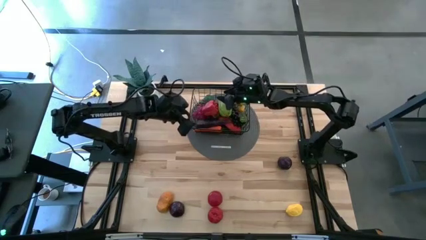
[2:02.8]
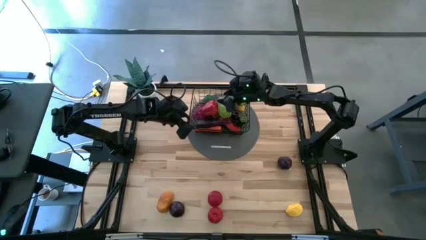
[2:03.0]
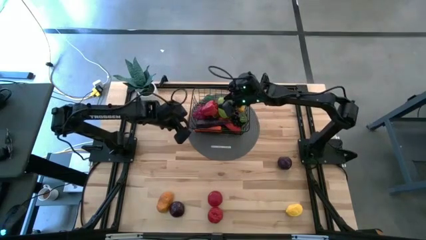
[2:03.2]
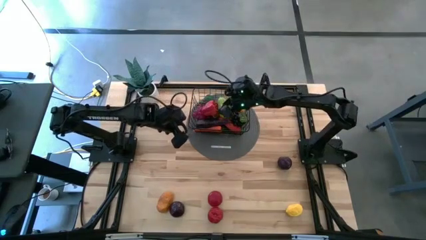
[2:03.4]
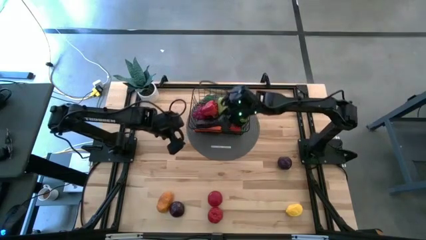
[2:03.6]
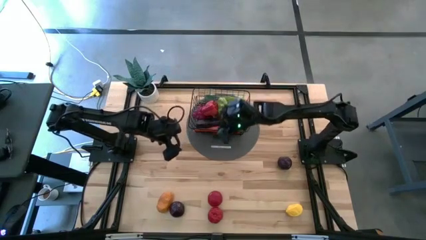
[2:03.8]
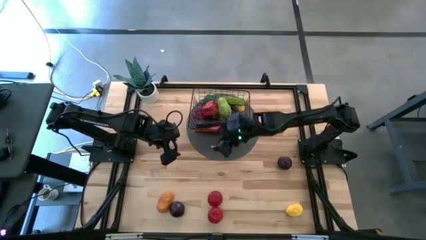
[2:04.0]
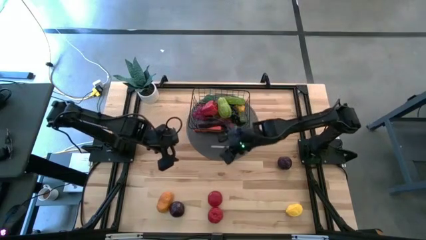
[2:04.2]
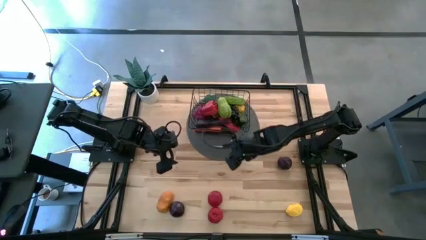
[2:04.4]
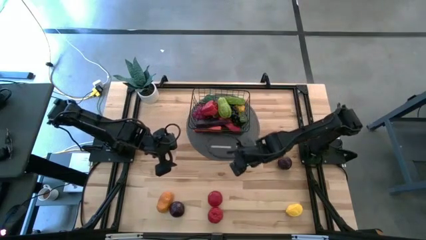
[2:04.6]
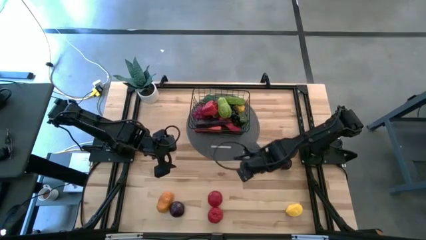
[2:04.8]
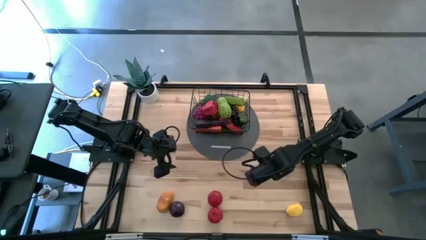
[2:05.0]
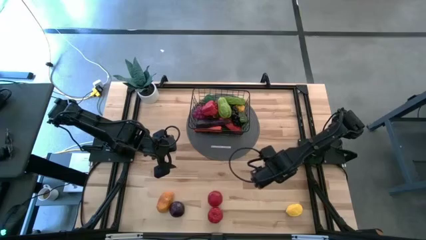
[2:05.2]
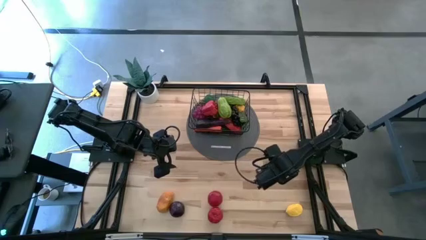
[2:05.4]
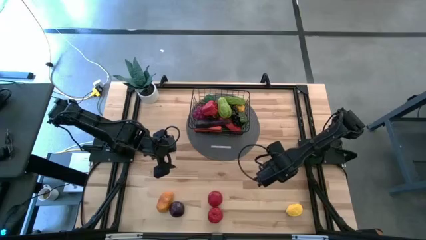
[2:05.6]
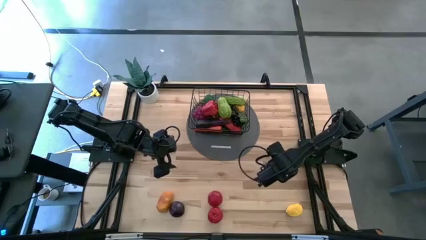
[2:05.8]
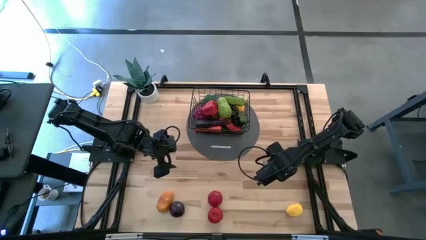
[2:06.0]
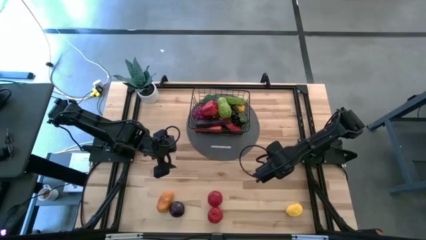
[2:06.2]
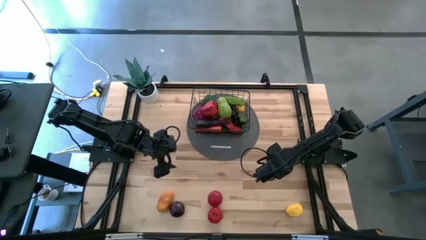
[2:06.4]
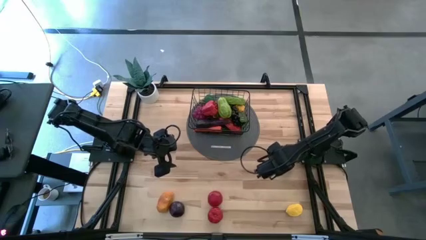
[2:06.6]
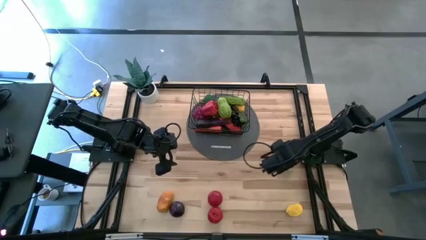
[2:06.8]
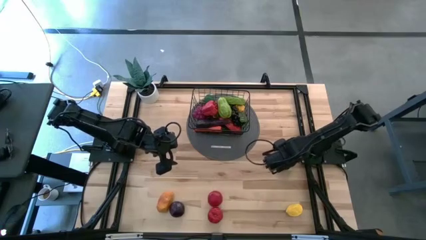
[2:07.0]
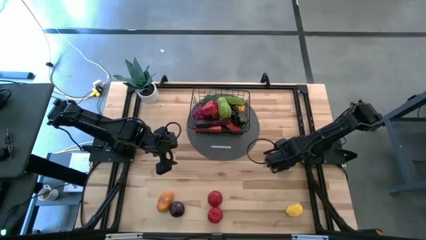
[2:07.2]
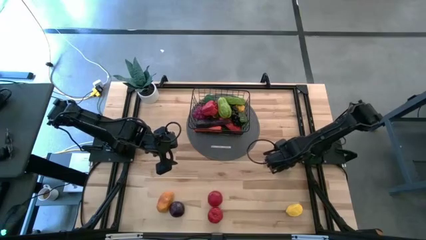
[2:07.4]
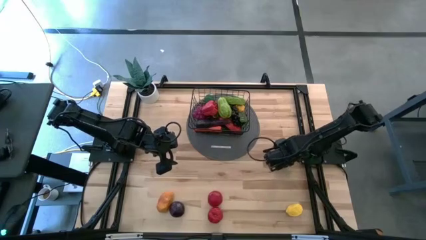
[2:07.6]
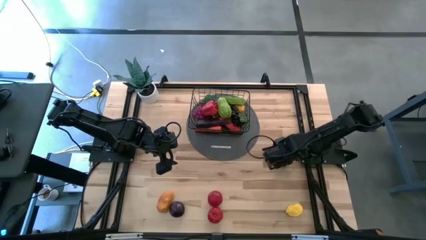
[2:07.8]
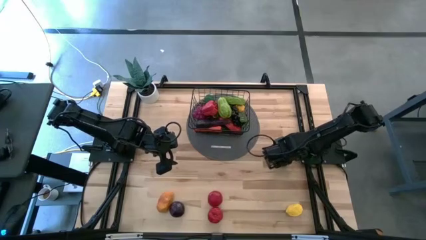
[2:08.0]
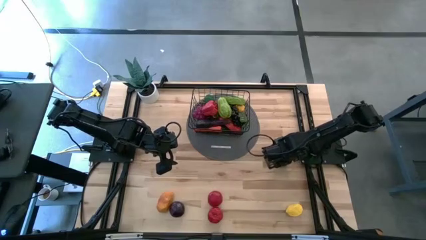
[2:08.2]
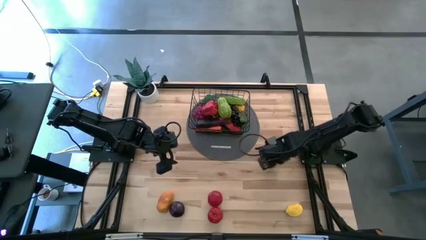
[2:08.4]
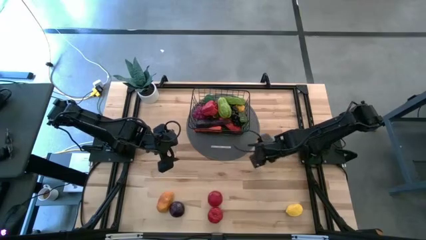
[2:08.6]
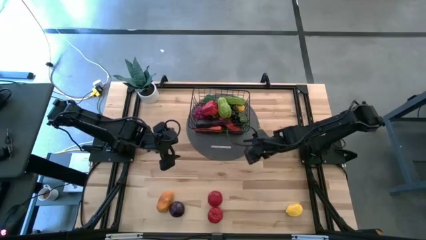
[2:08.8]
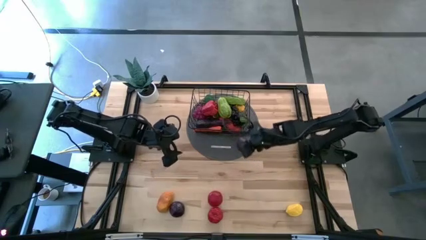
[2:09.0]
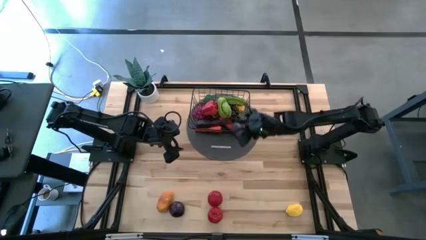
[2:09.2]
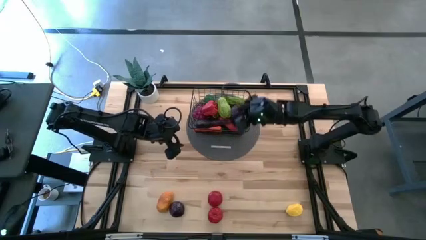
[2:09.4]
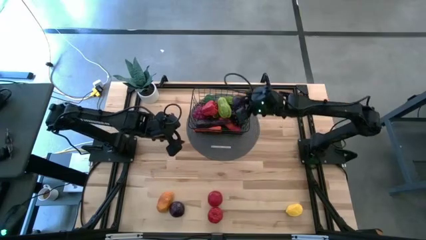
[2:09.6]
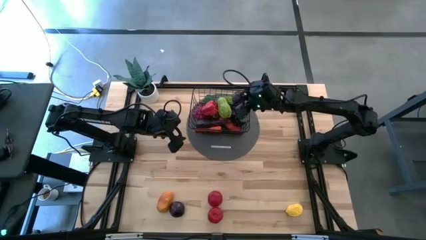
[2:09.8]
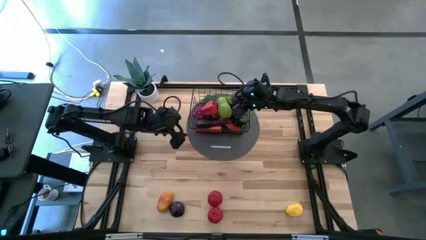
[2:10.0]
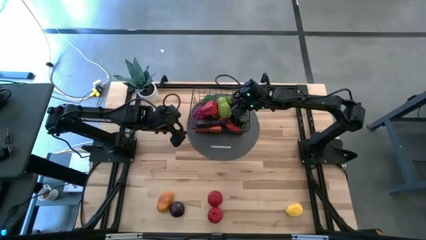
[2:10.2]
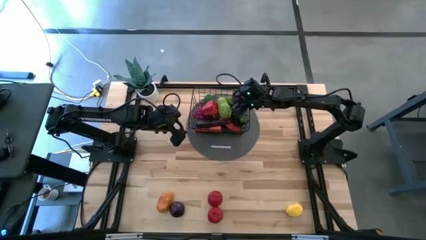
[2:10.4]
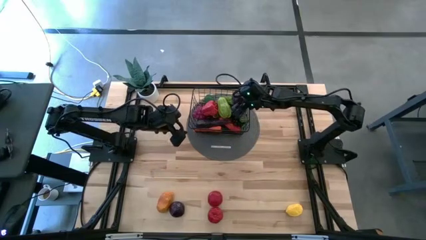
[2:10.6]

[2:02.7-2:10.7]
Task: Build produce basket
Put the top violet plum into the wire basket

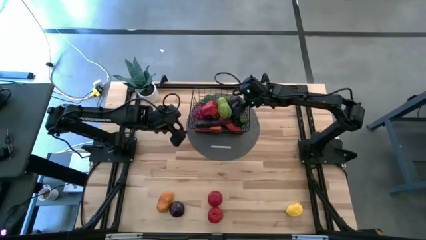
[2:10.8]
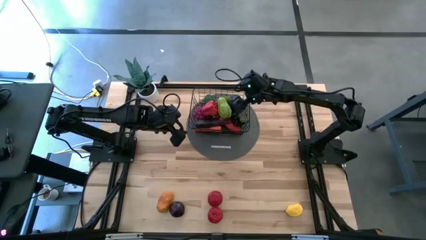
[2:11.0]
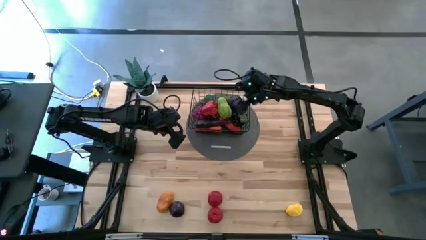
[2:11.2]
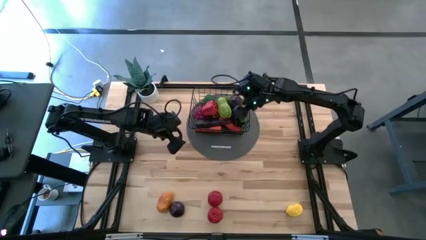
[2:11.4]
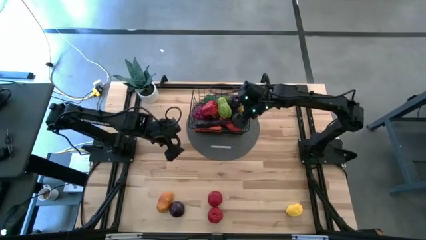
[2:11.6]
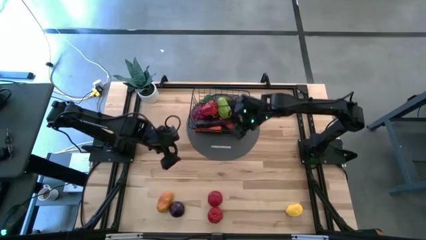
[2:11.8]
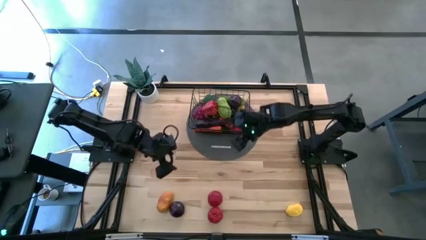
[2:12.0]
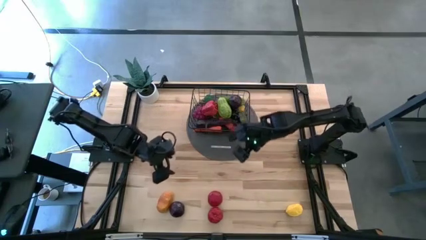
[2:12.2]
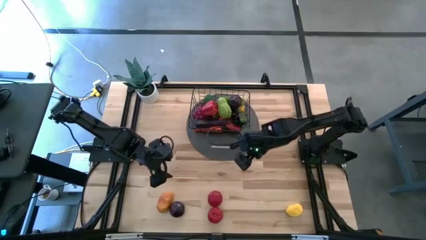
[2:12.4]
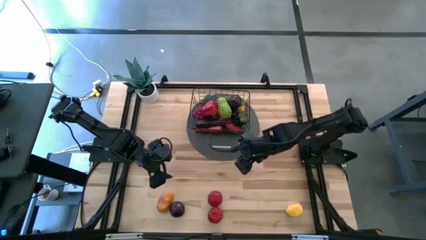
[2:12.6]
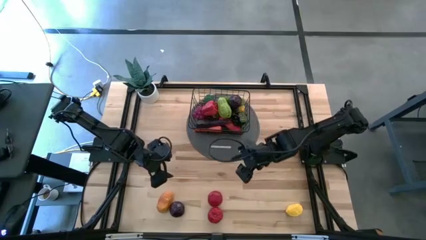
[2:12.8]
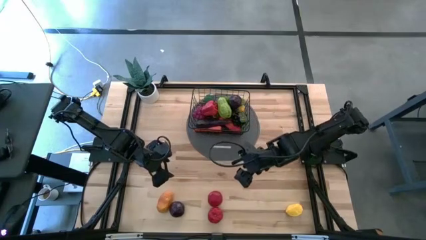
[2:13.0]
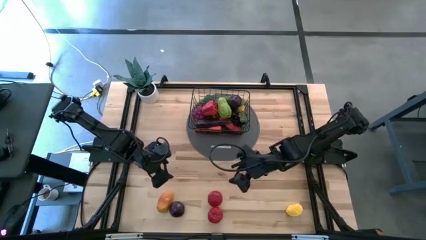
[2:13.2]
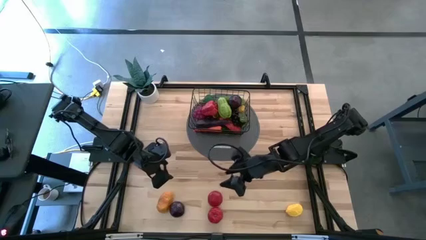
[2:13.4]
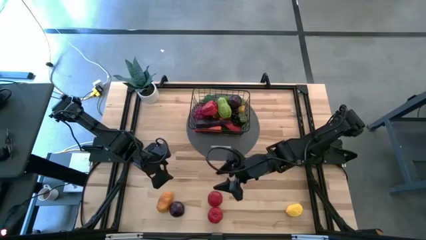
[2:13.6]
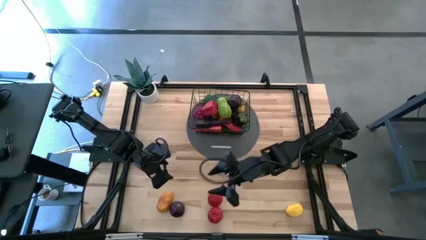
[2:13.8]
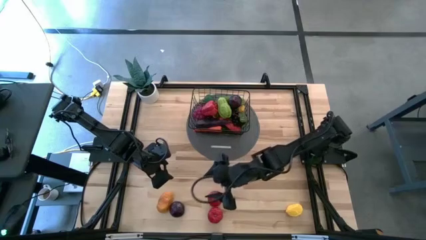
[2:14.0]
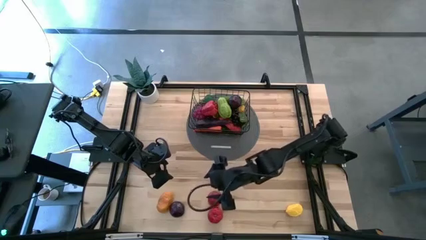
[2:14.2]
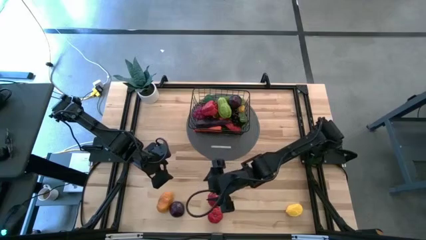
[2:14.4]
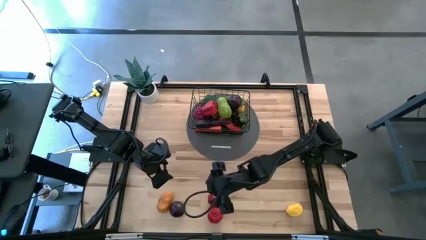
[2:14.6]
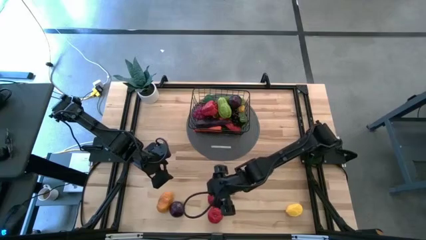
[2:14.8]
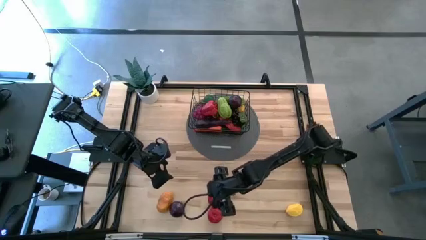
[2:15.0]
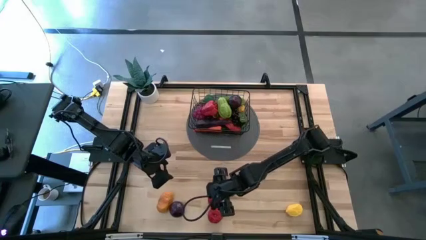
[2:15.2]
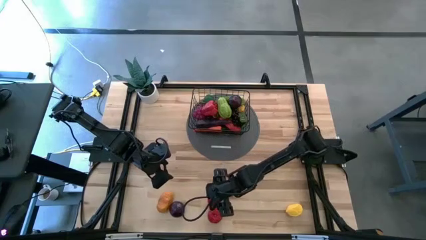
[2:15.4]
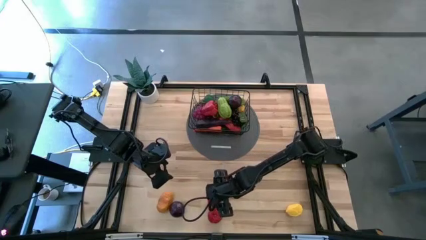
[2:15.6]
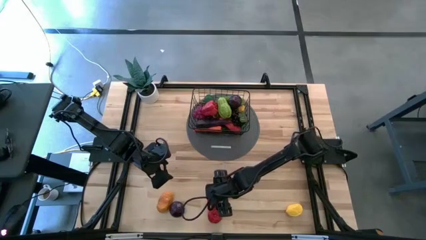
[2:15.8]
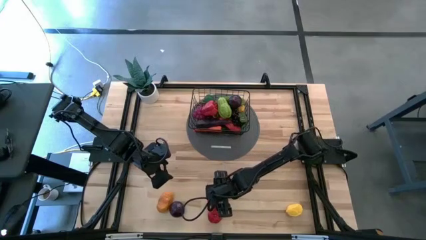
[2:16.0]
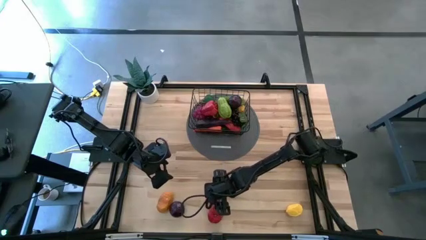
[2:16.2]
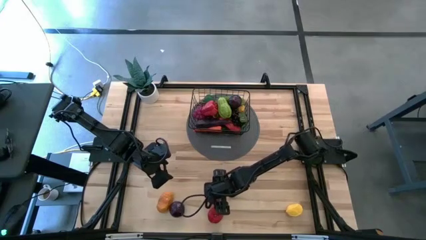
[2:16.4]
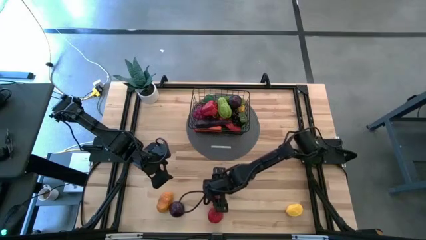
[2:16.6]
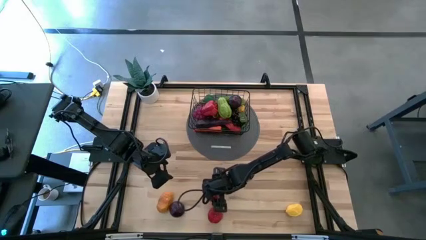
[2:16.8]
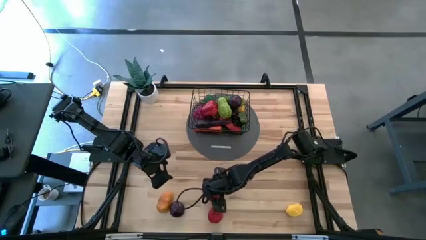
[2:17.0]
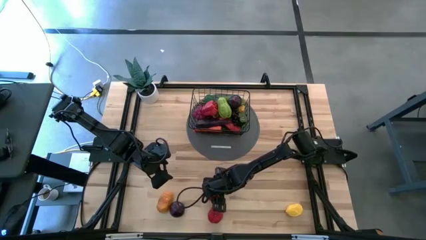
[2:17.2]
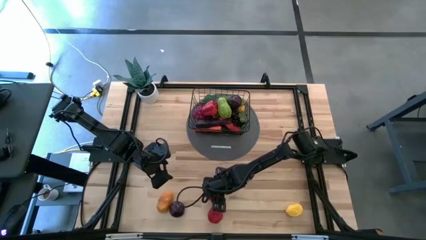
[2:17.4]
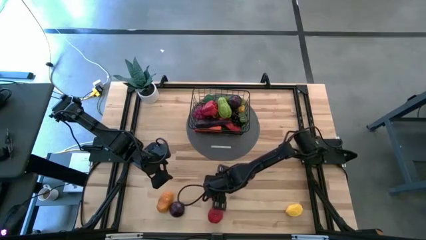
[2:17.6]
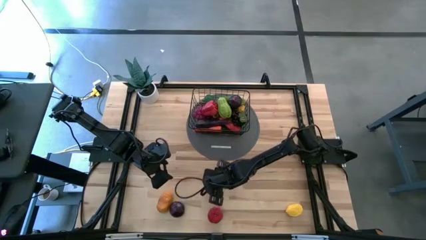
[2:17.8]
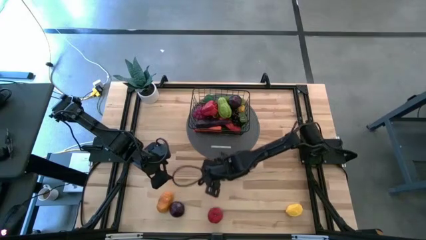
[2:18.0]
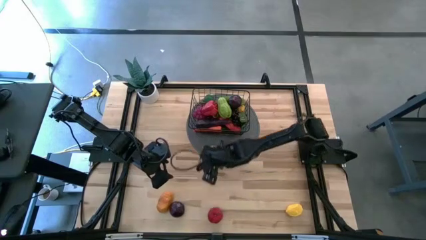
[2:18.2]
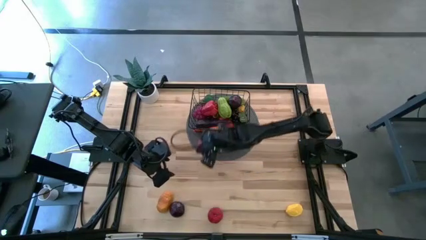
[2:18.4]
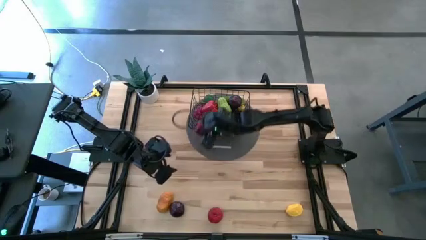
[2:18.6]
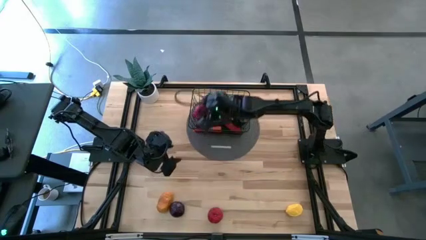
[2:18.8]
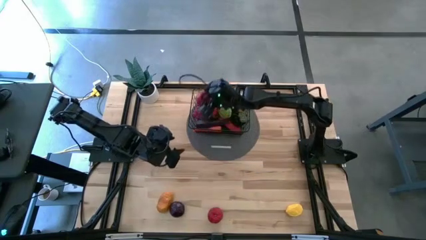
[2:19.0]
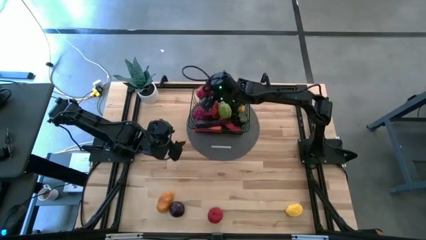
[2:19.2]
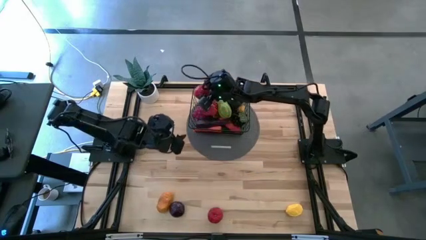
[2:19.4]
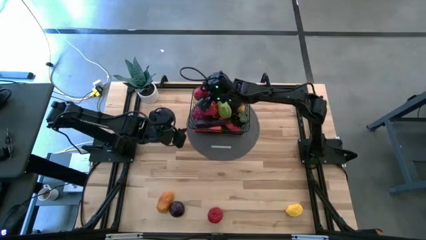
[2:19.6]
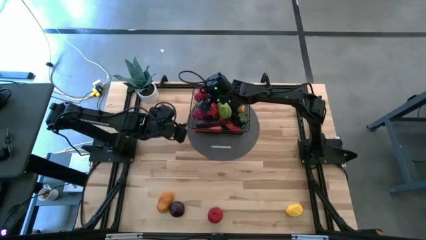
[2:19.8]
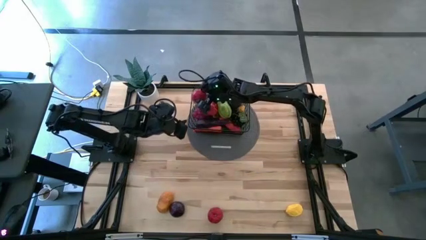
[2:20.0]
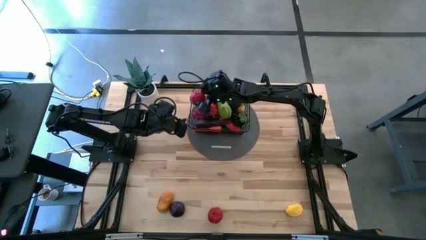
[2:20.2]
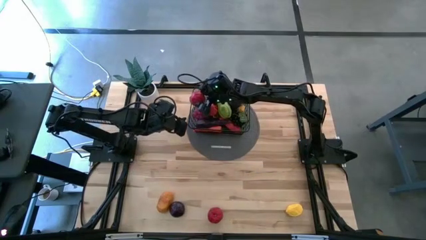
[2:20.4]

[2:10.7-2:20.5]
Put the top red tomato into the wire basket
